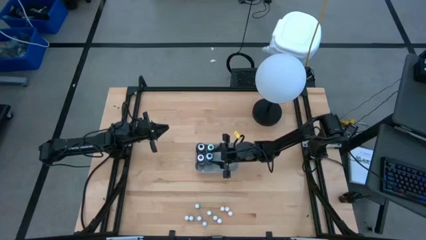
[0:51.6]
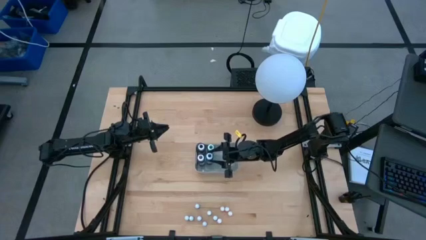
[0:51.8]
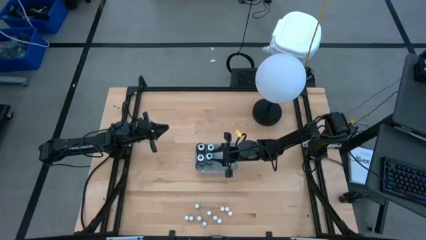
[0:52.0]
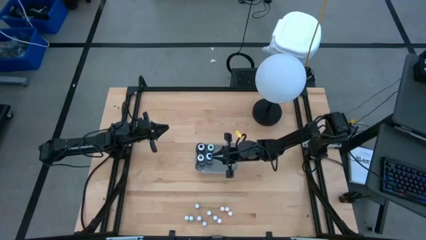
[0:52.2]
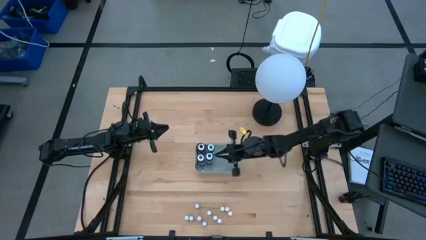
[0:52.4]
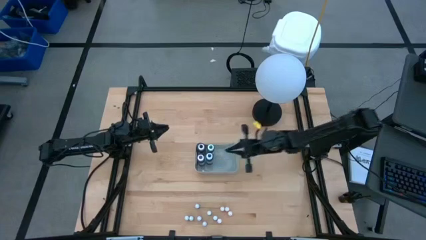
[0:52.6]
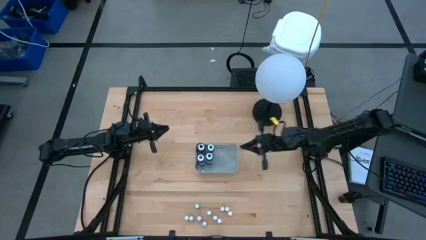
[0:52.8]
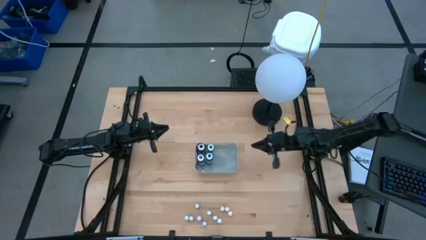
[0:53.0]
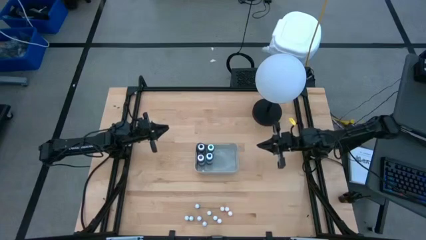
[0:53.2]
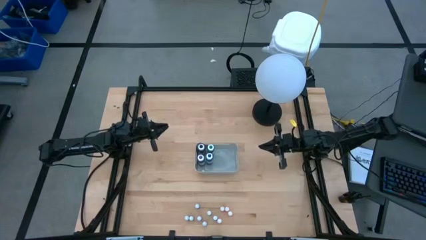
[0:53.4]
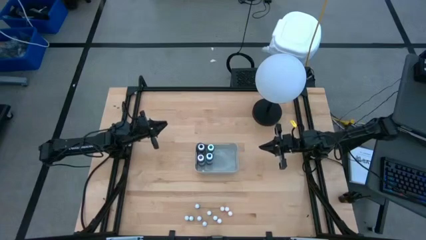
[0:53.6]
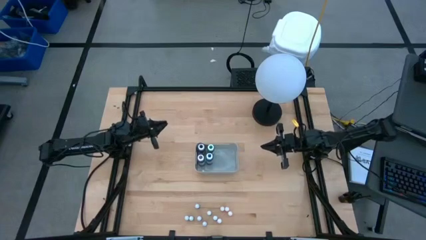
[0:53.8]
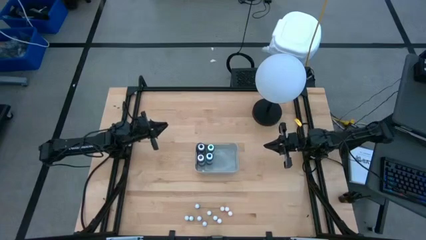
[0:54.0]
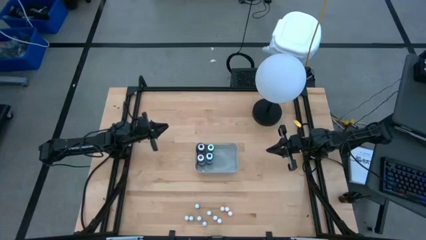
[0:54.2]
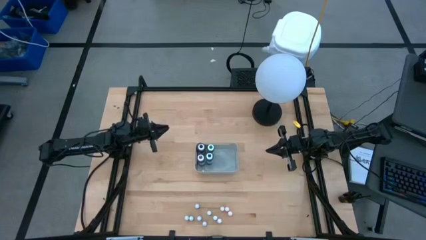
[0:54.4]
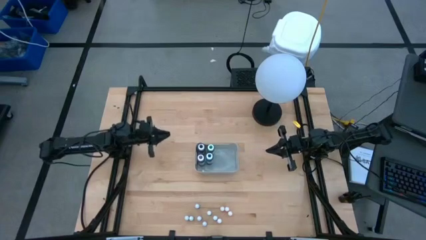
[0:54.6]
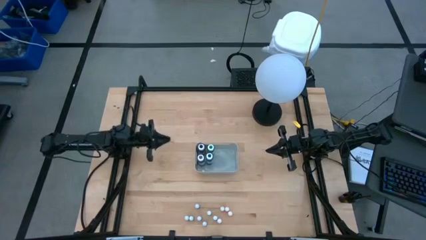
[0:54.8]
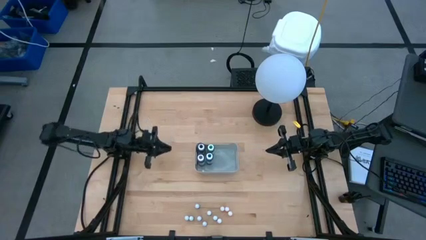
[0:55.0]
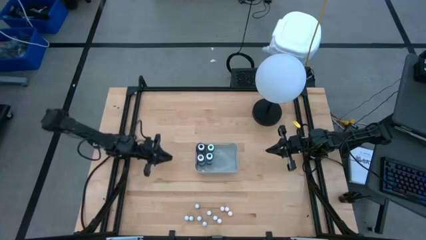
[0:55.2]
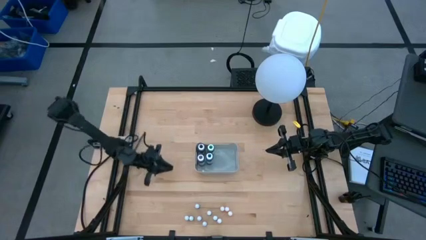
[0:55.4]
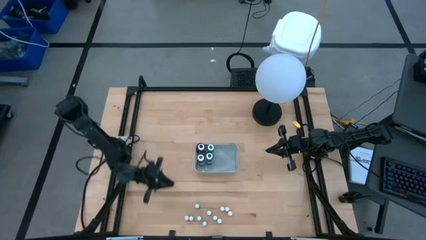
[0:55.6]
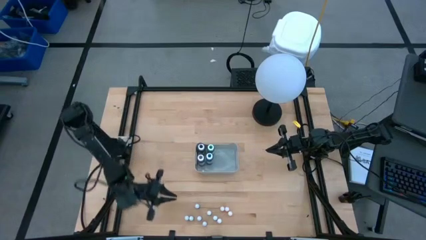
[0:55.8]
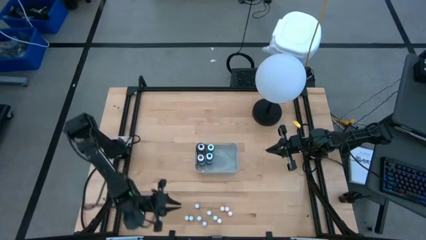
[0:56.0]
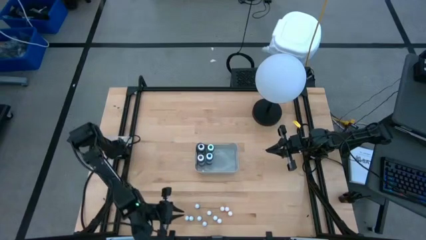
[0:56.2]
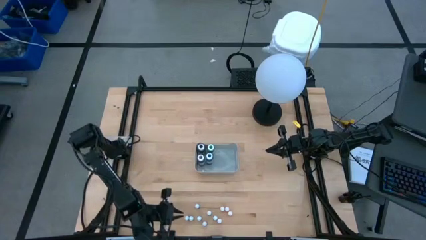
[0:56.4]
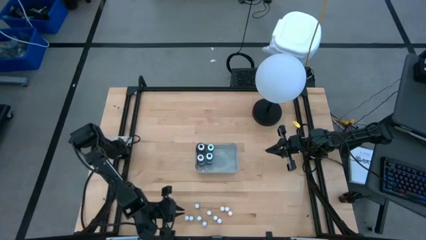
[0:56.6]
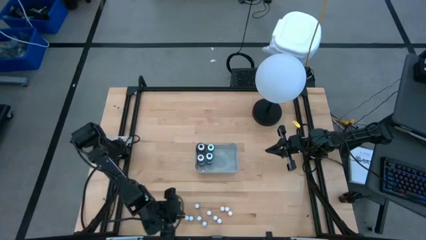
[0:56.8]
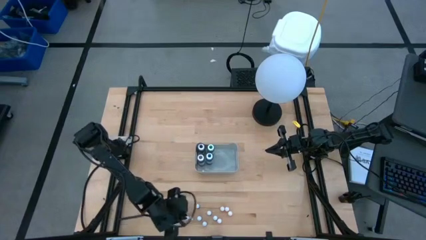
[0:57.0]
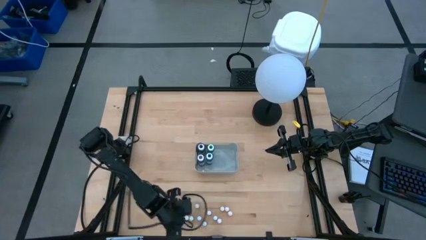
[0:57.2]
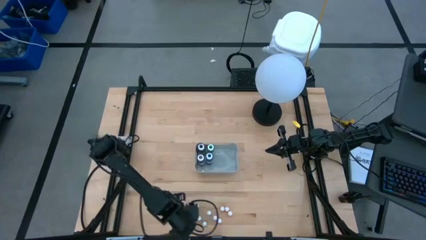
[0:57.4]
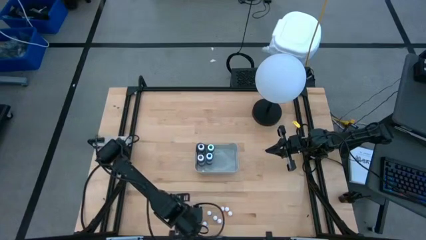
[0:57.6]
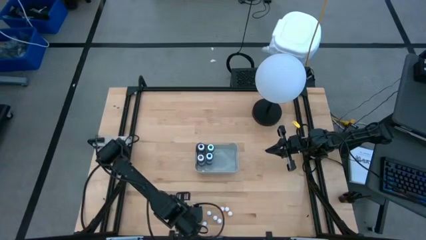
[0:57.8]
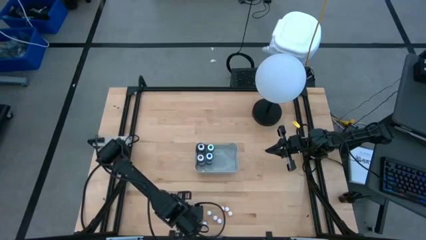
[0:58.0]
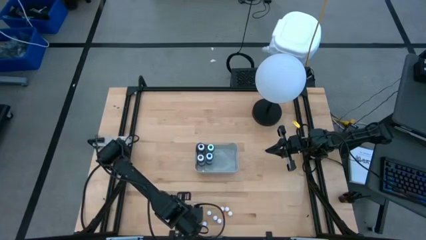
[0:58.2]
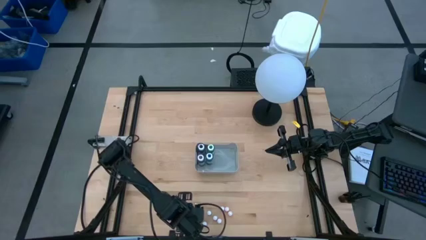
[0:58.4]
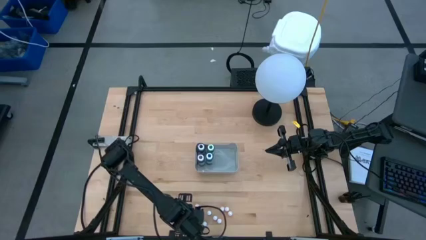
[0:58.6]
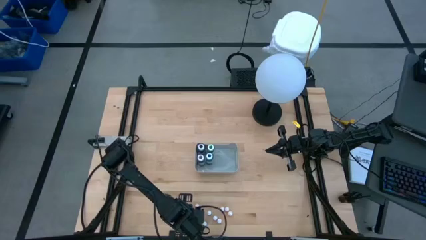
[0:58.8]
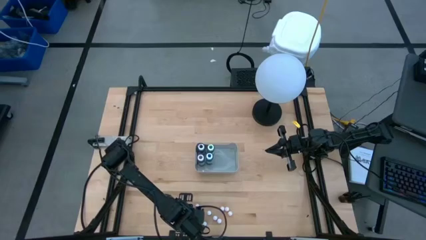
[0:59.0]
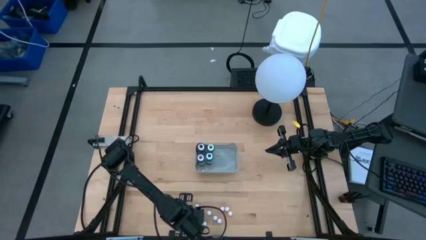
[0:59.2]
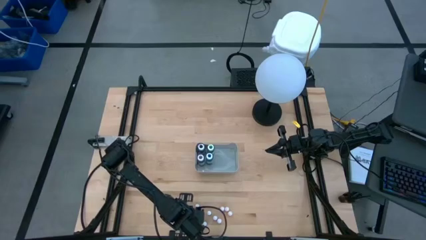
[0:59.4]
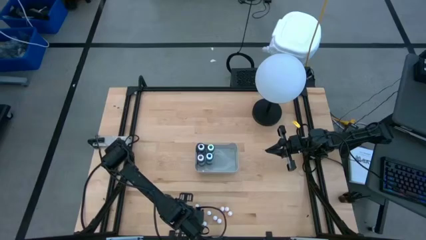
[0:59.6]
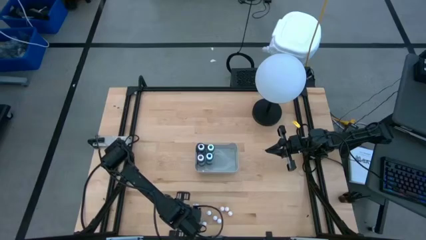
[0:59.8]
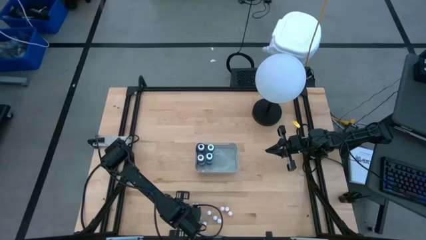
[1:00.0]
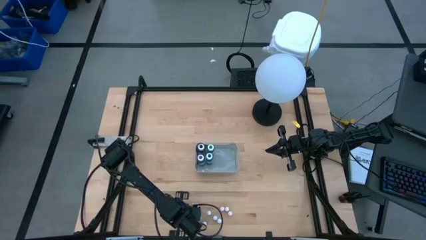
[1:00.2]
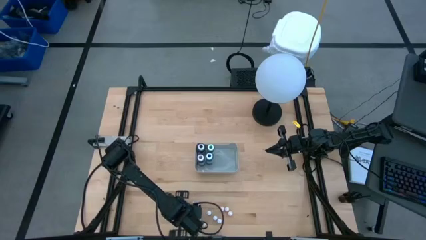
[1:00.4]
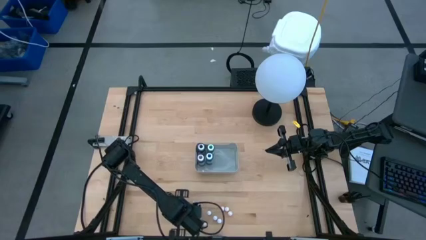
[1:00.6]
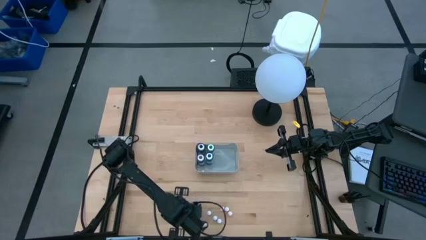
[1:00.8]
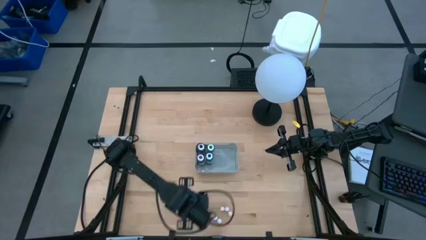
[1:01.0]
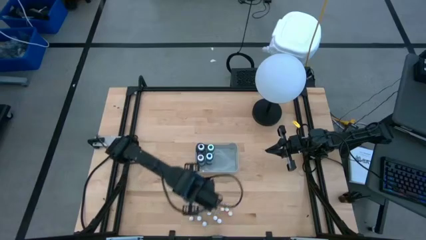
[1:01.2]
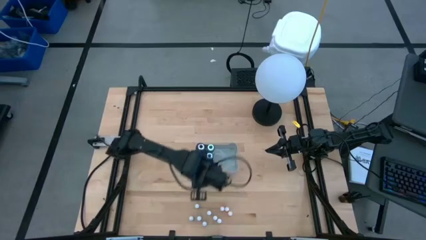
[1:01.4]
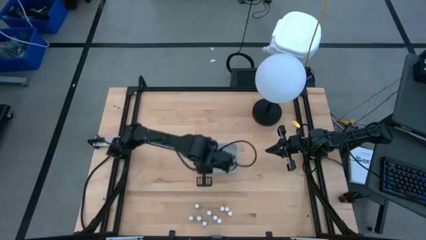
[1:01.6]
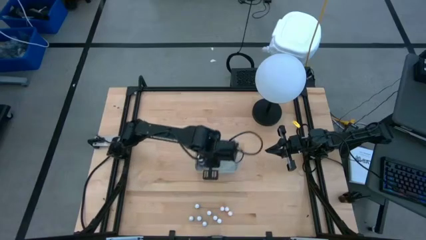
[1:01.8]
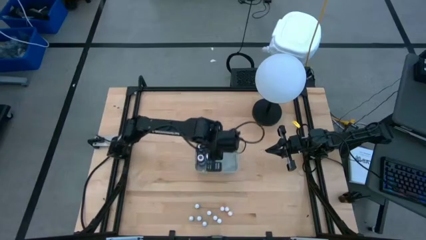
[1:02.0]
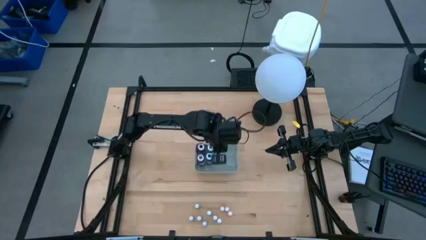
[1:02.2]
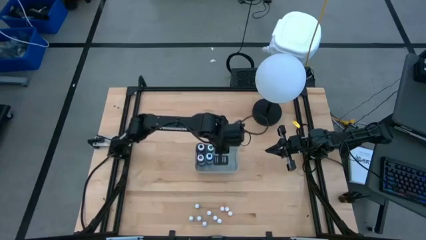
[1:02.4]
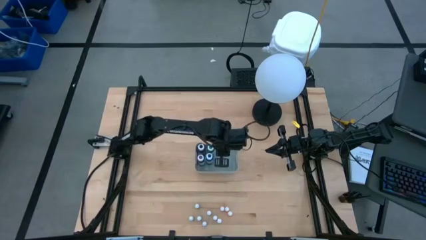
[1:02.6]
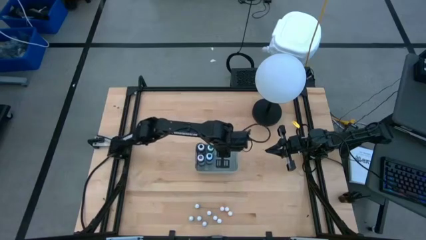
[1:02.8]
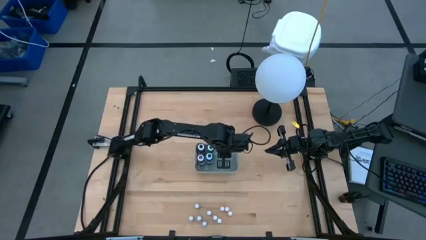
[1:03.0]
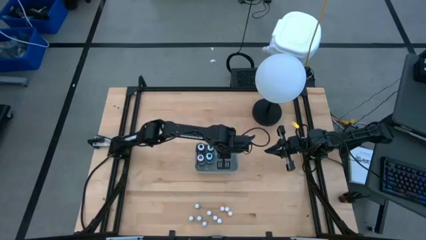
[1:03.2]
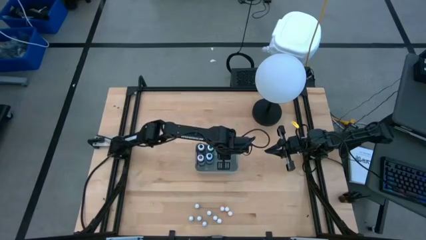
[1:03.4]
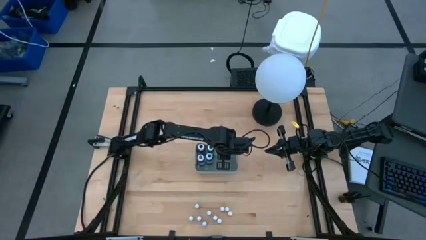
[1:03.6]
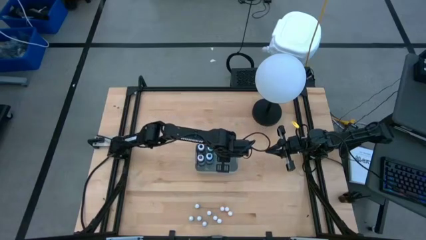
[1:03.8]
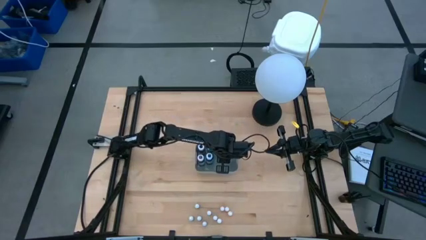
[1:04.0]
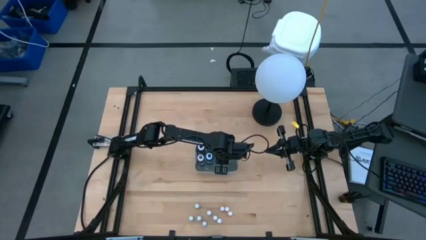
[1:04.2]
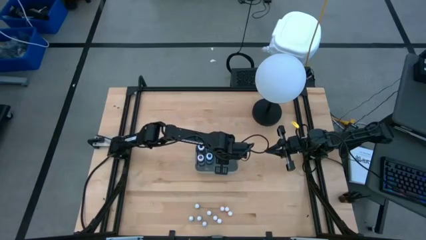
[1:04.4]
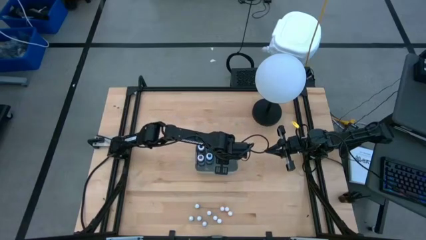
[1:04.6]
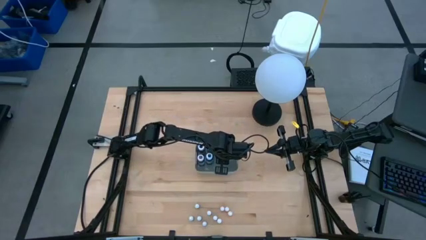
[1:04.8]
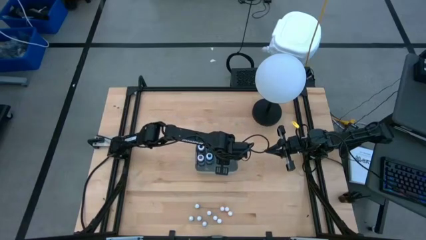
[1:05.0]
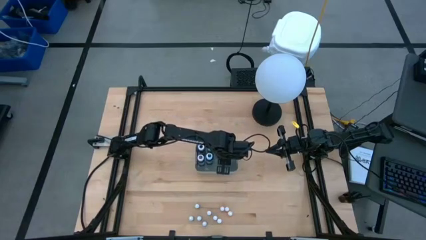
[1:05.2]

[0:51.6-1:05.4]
Task: Pick & Place food coloring
Put the small blue food coloring bottle into the gray bin
